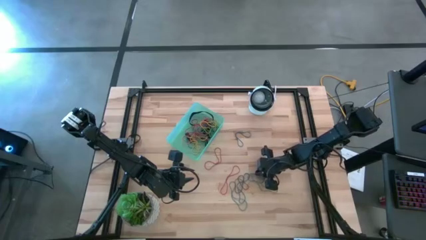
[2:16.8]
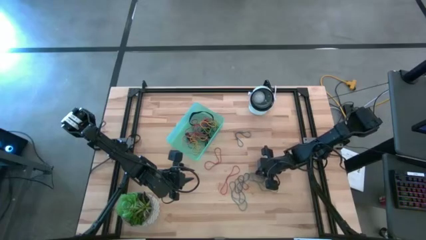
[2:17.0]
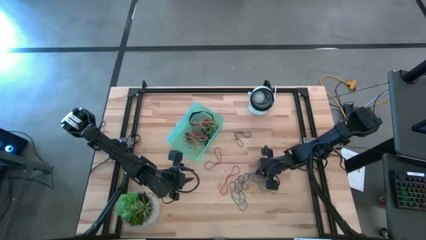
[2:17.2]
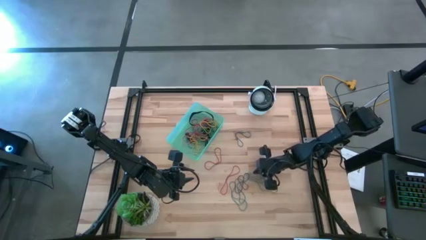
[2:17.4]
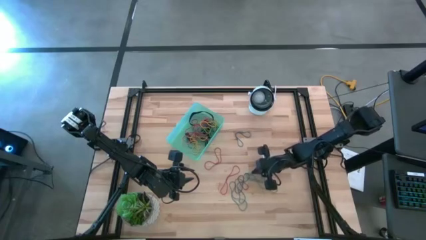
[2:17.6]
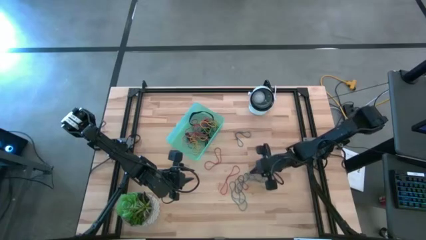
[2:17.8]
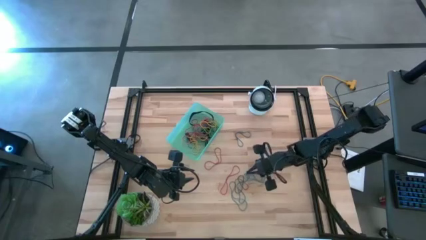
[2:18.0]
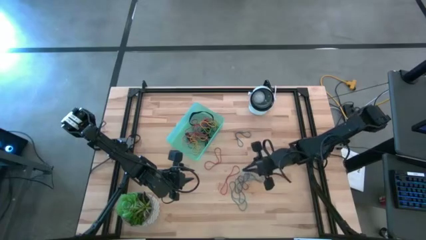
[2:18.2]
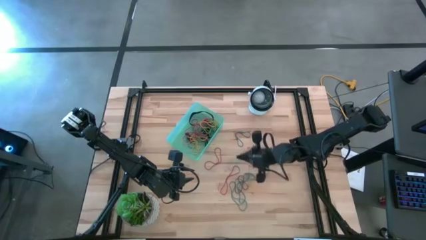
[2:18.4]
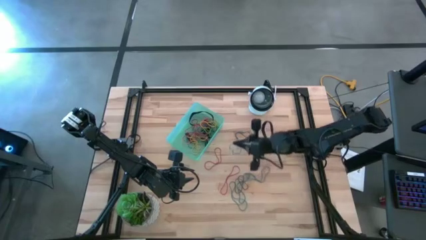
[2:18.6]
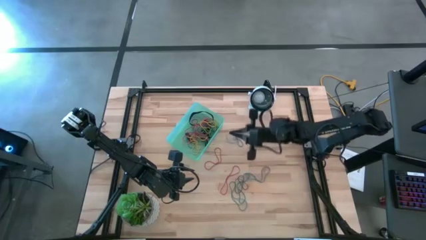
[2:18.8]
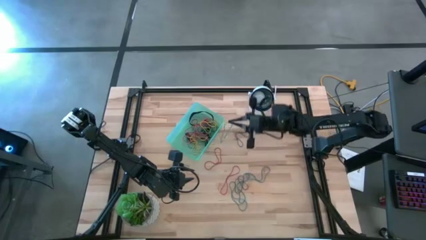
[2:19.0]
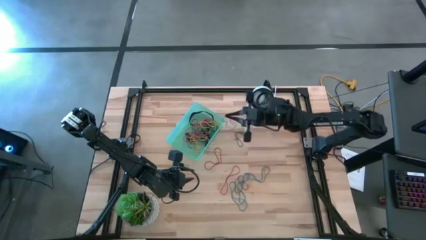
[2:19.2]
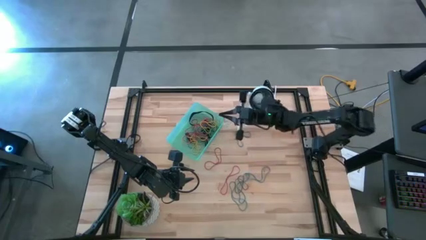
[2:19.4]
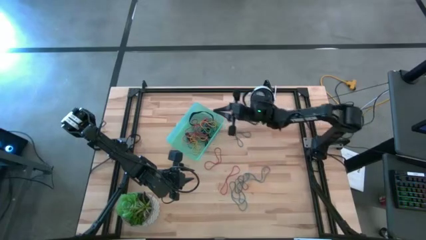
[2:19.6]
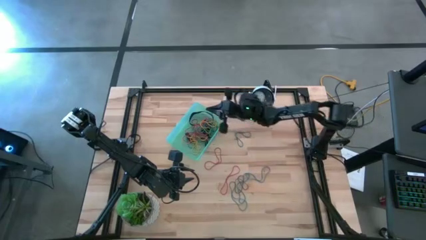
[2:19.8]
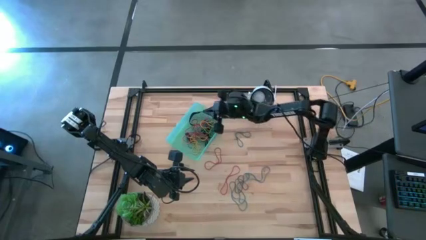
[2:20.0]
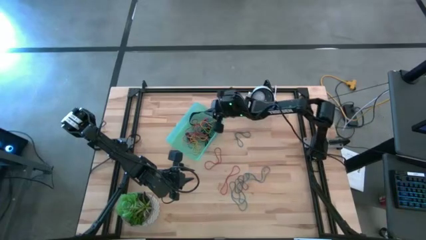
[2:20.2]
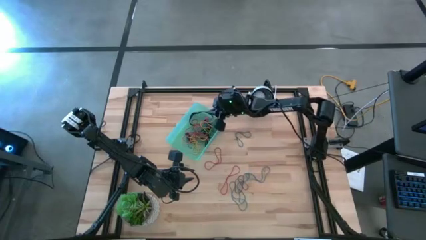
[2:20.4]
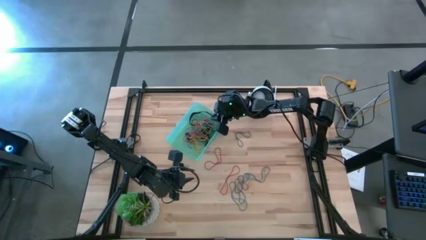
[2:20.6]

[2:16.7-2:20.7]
Task: Pick and place rubber bands into bin
Put the blue rubber band into the green bin

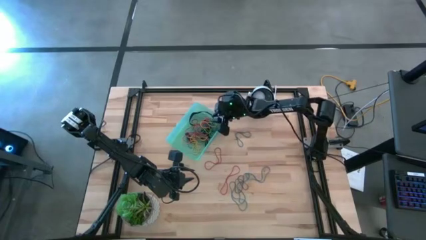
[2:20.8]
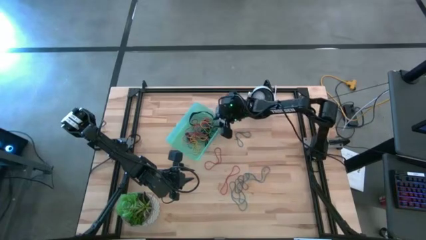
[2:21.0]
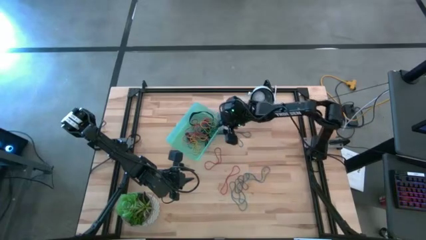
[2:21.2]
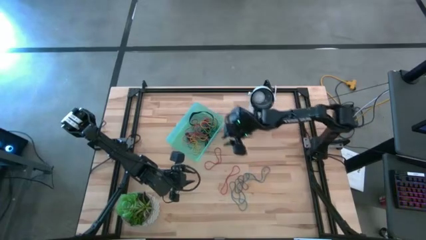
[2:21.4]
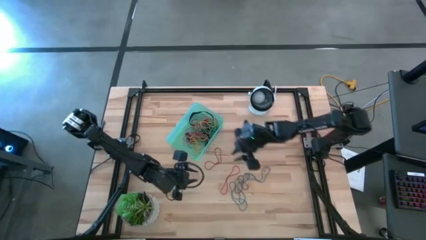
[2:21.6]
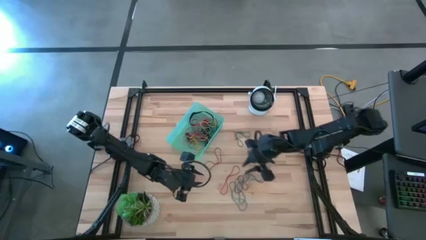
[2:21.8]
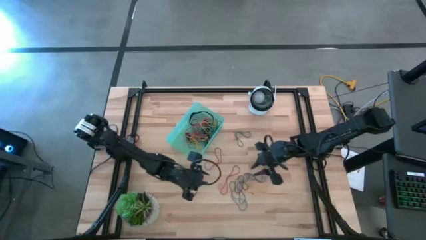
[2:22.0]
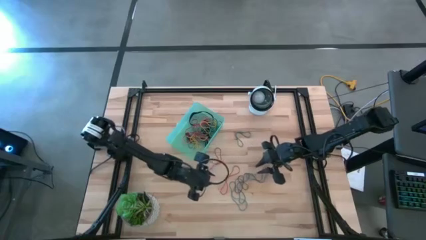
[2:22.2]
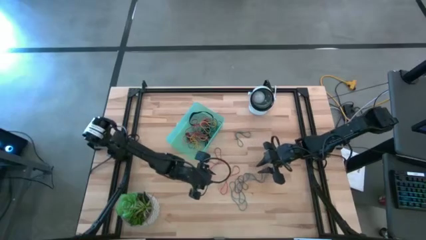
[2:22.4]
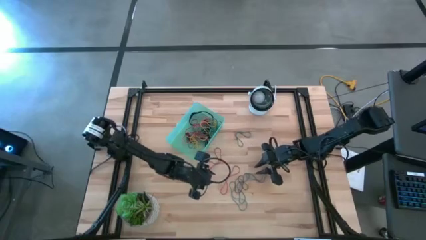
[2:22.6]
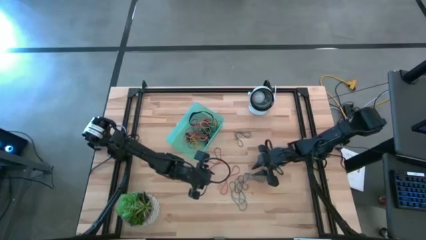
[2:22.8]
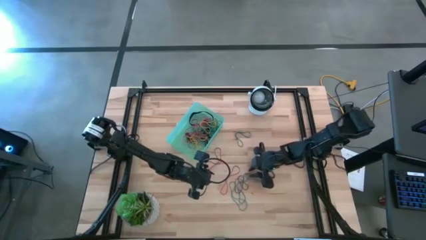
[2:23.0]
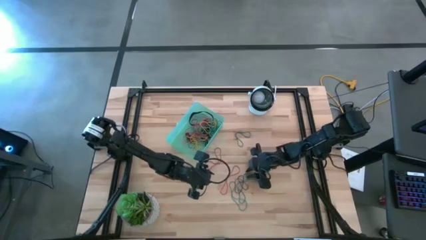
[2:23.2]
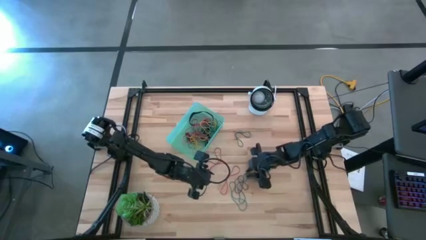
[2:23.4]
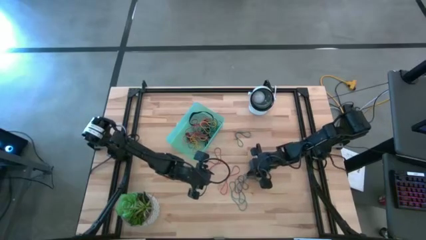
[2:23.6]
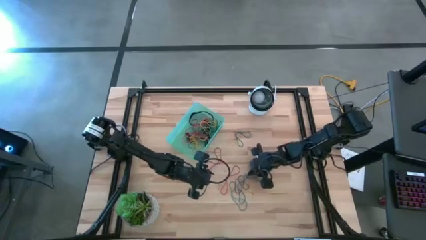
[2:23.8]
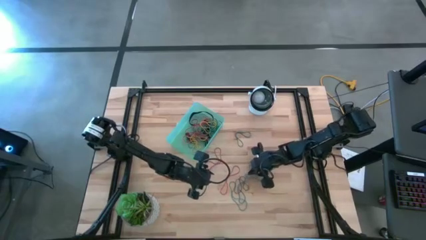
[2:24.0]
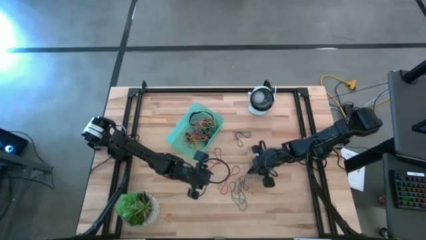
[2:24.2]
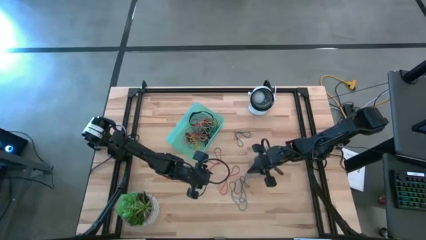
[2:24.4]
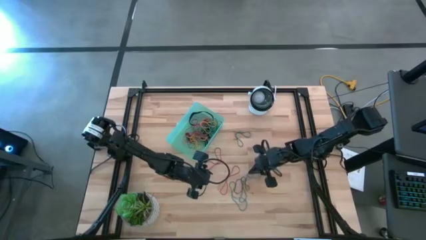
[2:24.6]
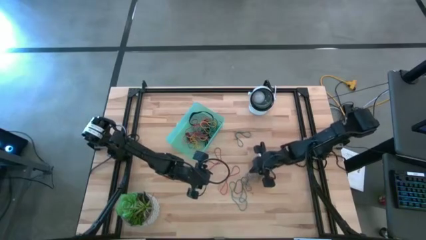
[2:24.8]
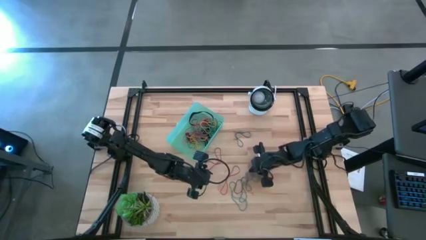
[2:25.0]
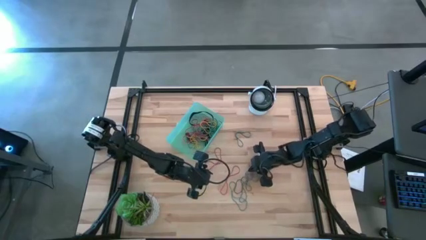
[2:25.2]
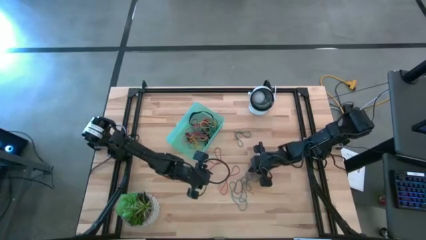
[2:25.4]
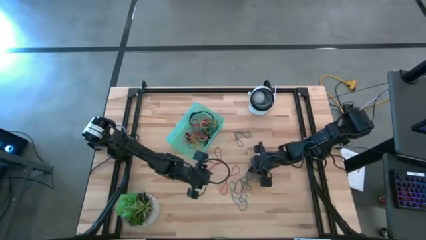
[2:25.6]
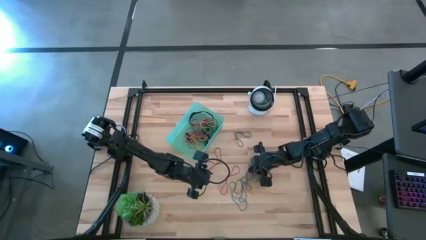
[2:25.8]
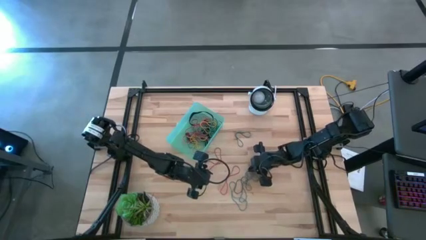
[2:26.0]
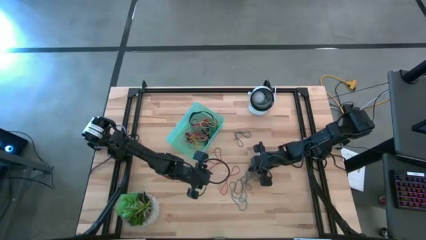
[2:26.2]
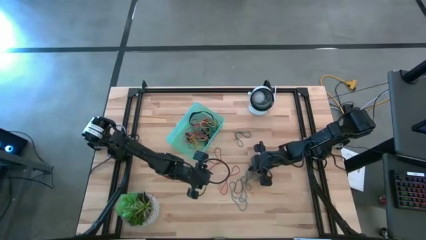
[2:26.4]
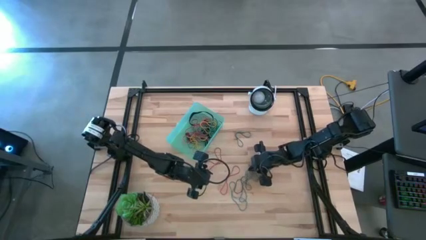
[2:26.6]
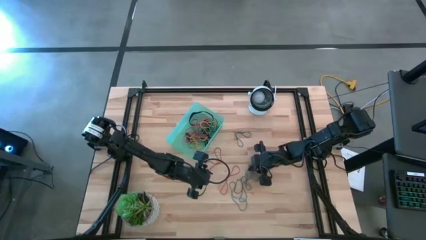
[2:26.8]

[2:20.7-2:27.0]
Put the blue rubber band into the green bin

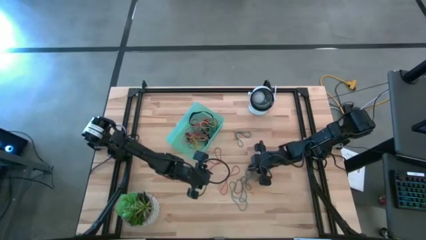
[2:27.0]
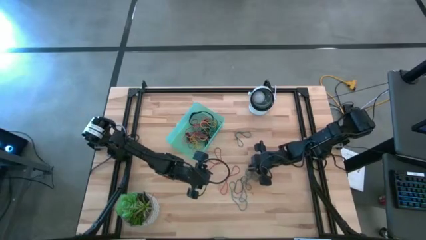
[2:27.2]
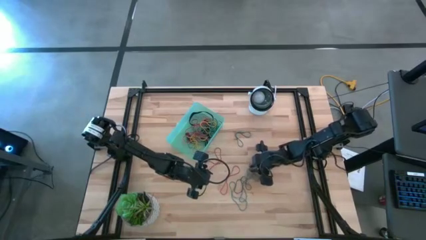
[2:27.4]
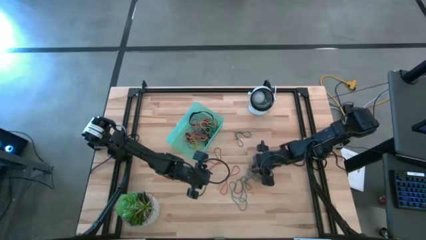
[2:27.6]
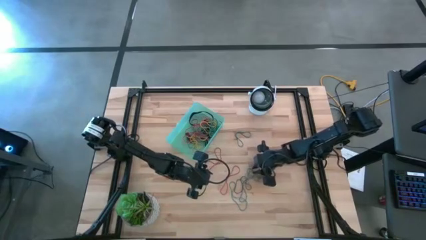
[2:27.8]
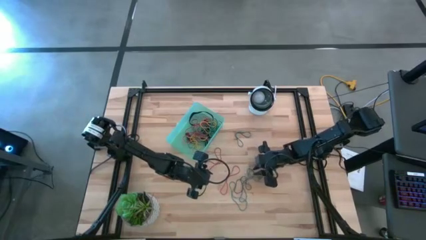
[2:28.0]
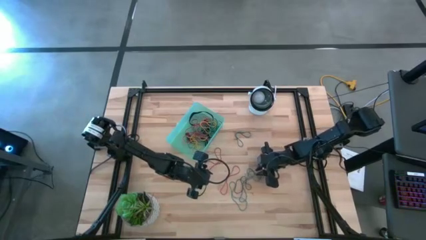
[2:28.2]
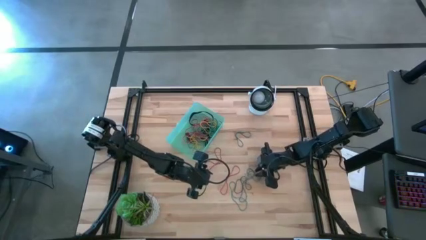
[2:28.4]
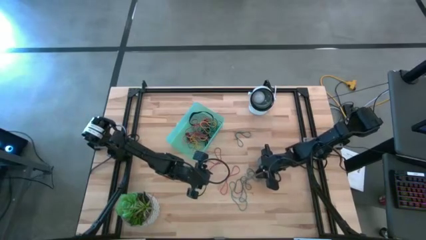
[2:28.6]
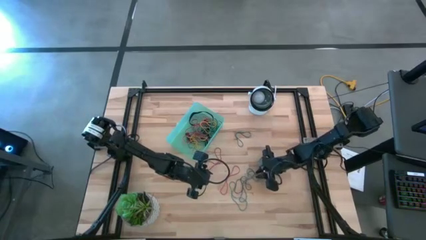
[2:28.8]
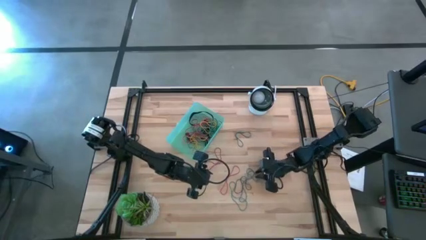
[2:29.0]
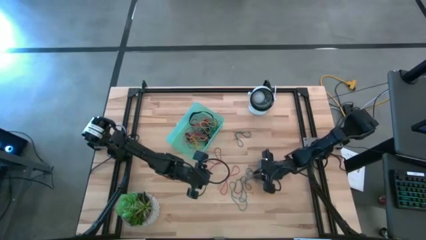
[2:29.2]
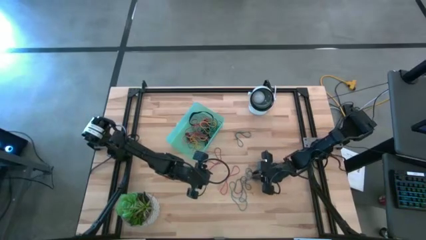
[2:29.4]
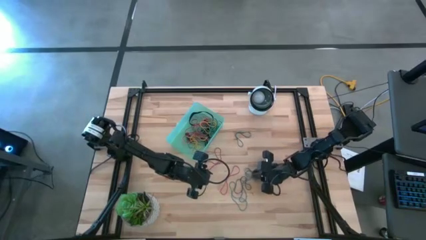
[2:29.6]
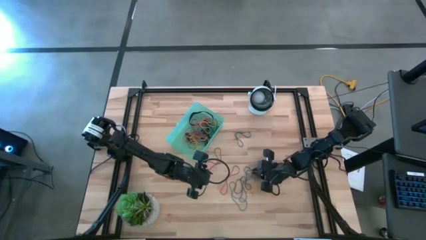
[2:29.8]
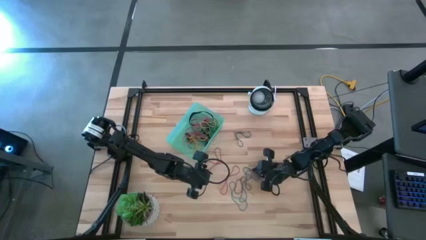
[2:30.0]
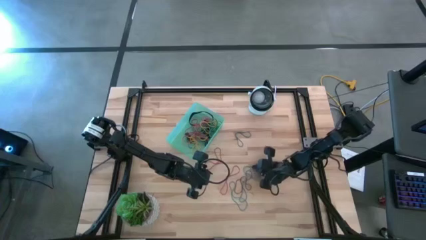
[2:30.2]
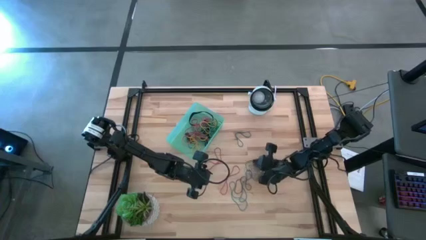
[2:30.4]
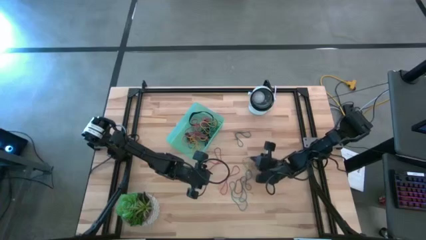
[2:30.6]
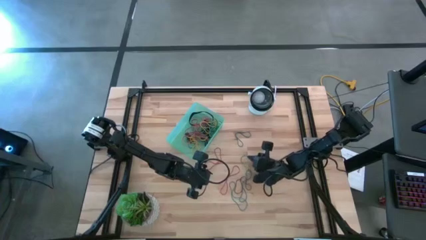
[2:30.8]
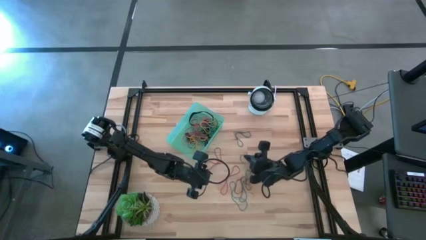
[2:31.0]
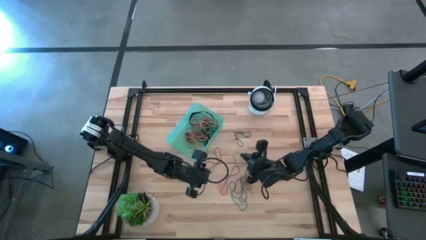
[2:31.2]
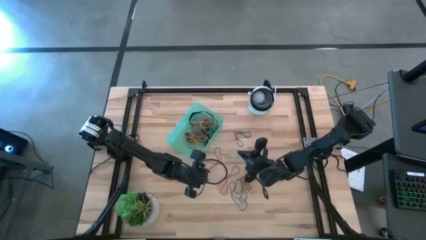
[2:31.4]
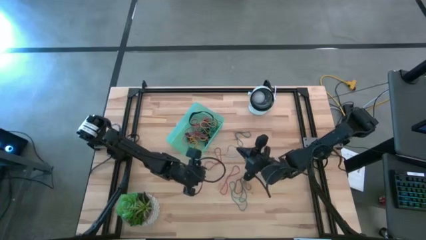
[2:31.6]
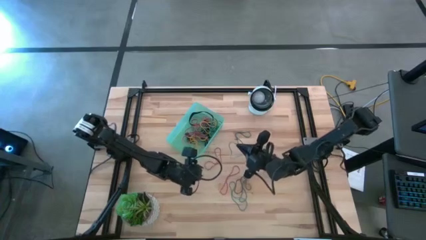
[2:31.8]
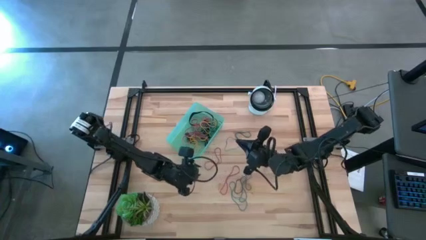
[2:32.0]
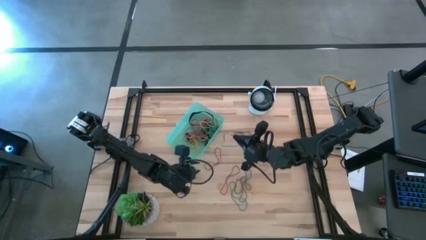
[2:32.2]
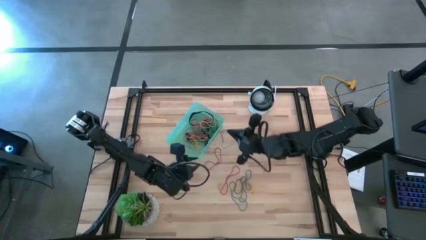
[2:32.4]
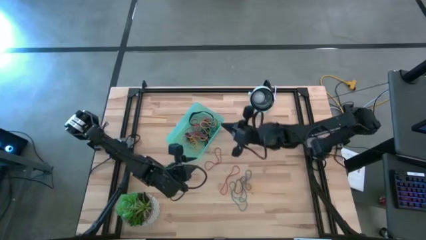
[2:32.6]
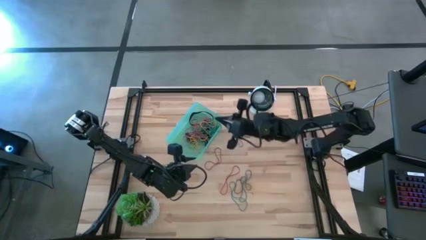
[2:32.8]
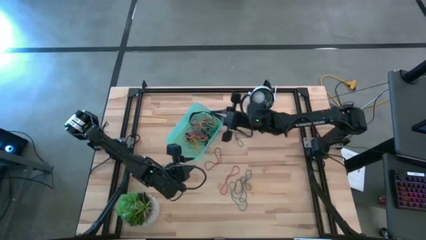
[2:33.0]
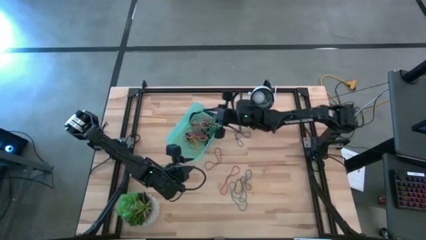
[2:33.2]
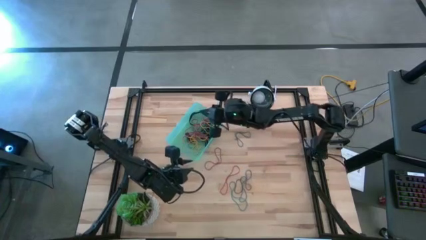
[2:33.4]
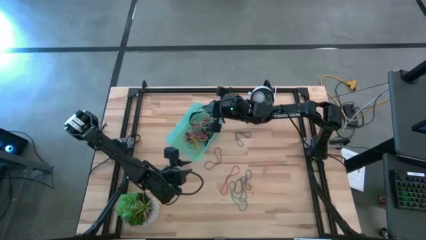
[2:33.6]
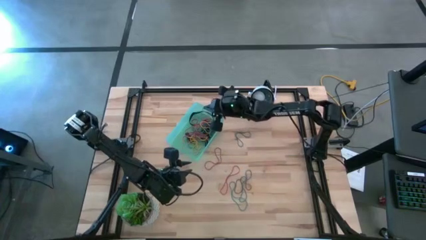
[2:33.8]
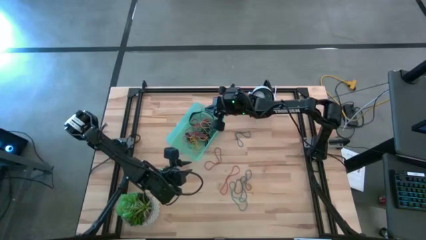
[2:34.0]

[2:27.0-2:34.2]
Put the blue rubber band into the green bin
